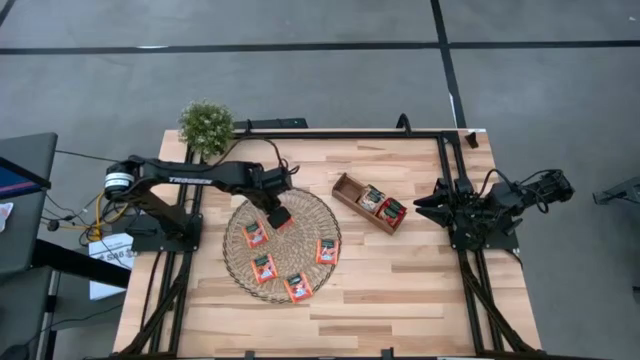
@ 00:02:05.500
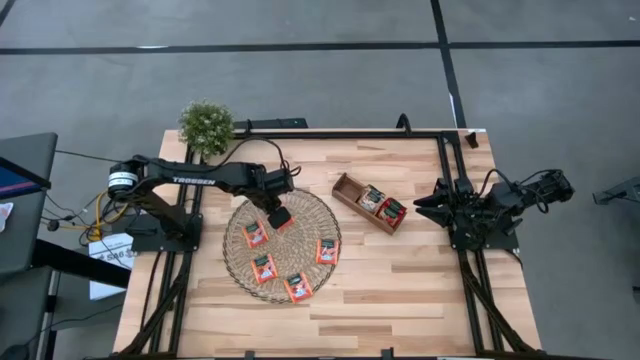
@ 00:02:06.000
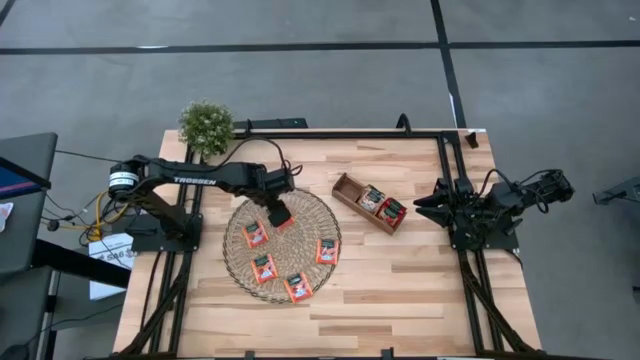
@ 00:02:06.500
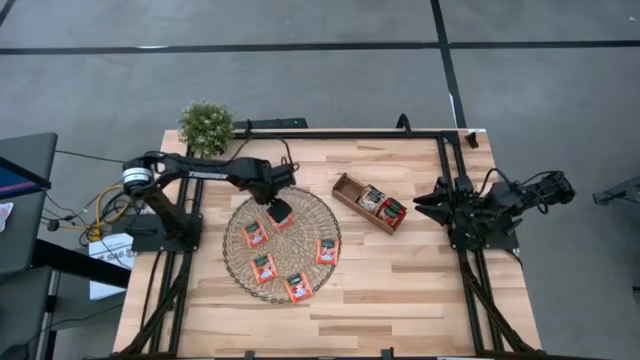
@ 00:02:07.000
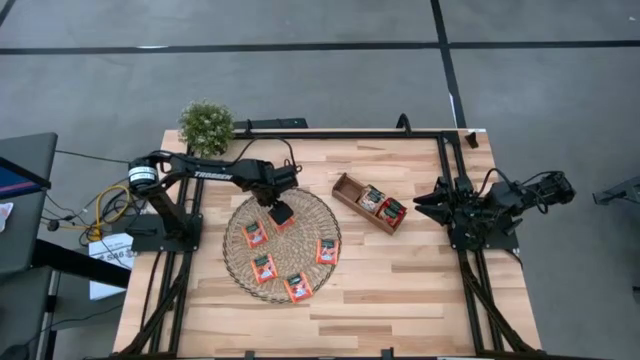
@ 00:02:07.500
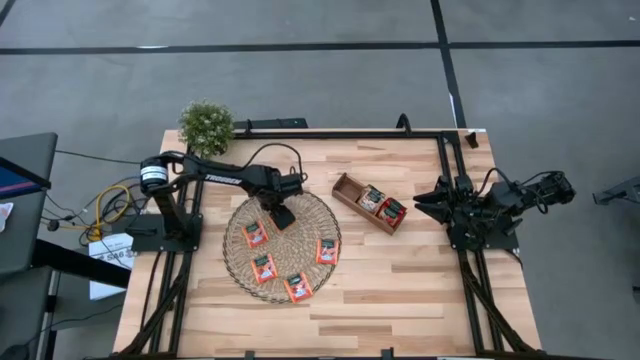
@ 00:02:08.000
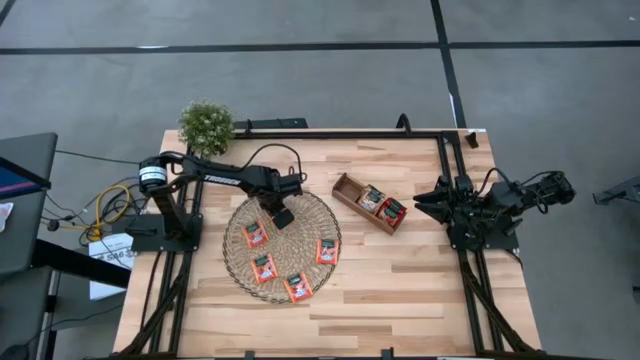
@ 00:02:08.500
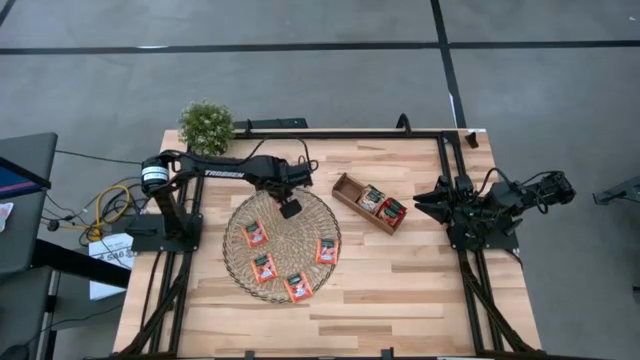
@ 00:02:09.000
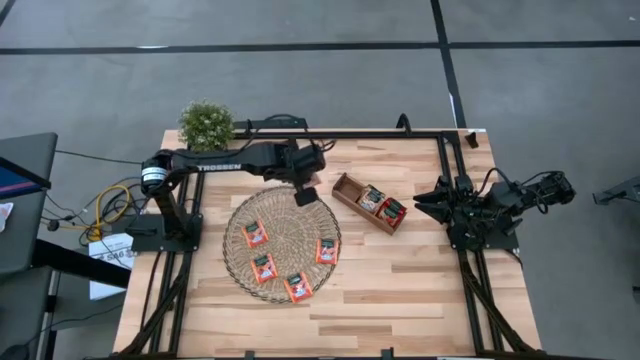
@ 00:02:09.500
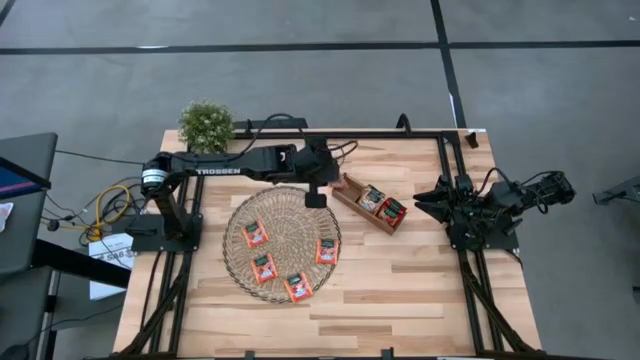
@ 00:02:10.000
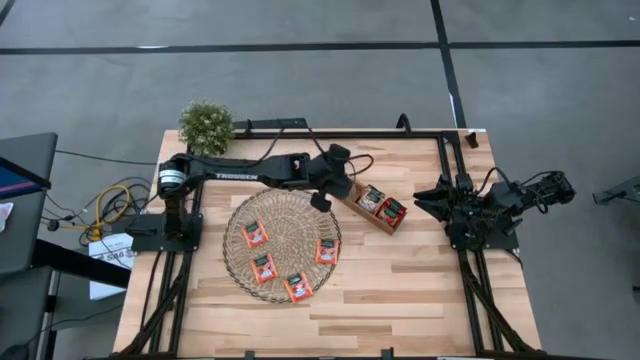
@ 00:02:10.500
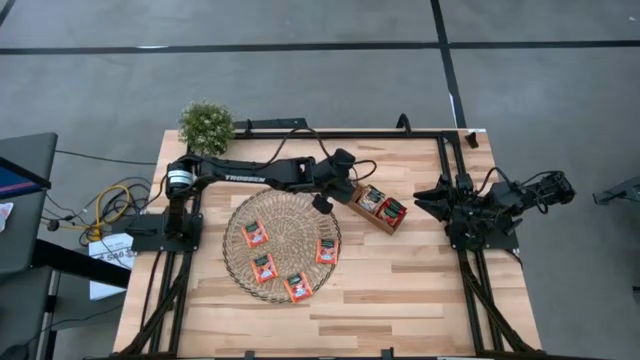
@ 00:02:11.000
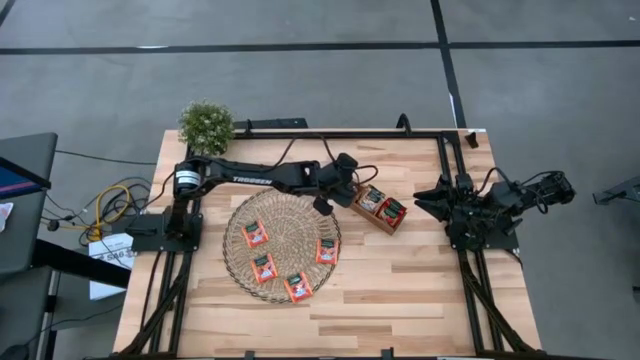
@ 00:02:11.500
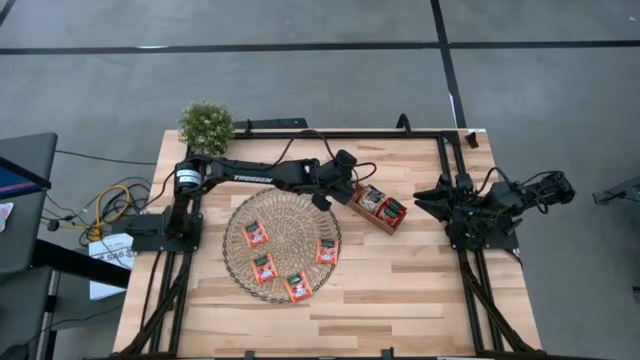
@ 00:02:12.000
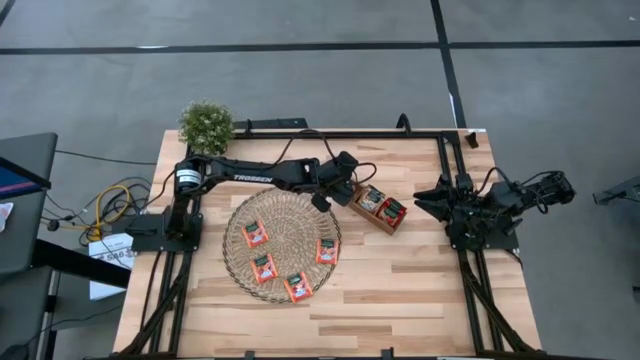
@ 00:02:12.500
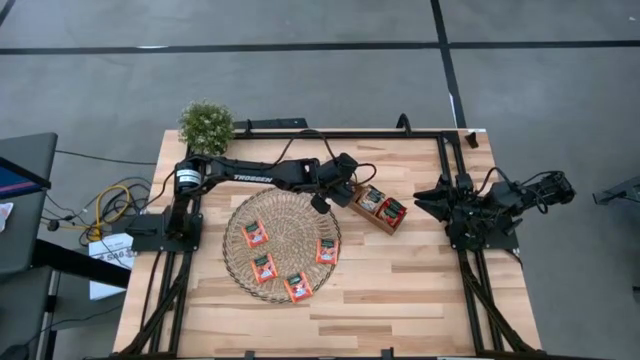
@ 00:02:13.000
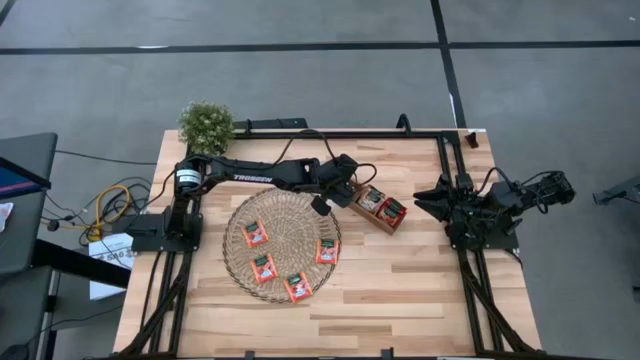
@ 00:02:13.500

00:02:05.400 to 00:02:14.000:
Task: Pick & Place Tea
Put the orange tea bag into the left section of the wooden organizer

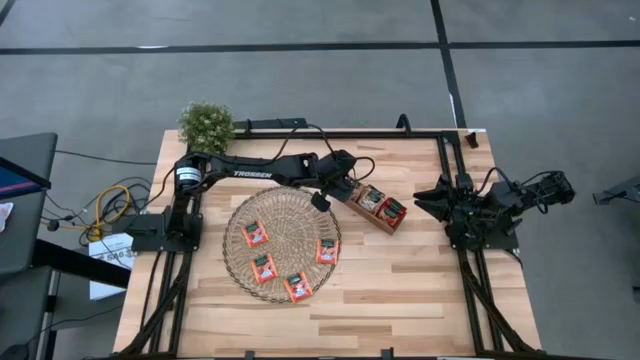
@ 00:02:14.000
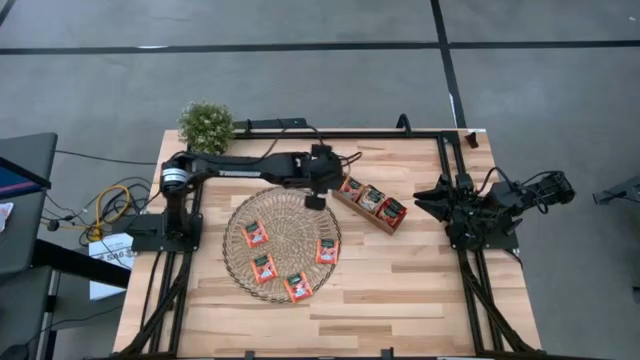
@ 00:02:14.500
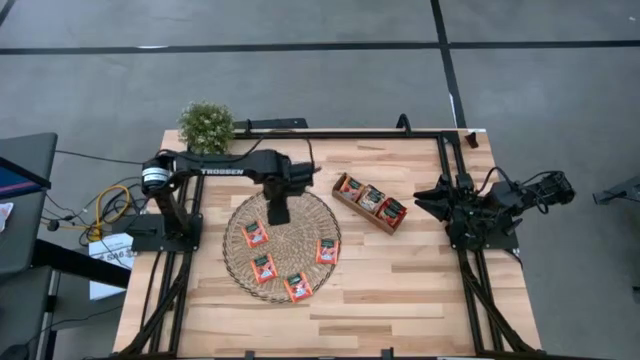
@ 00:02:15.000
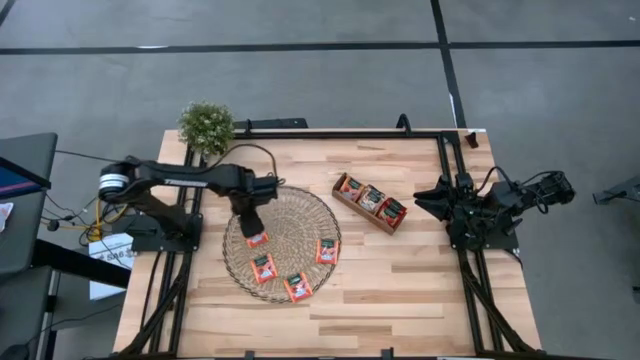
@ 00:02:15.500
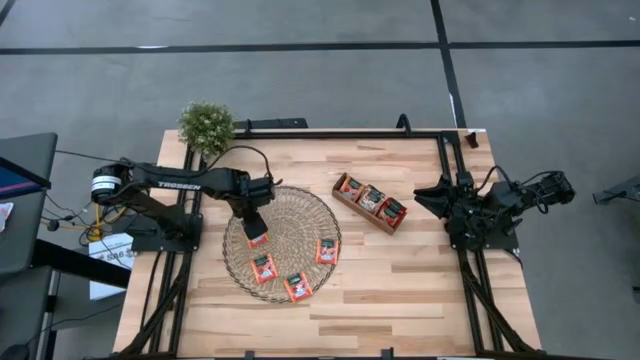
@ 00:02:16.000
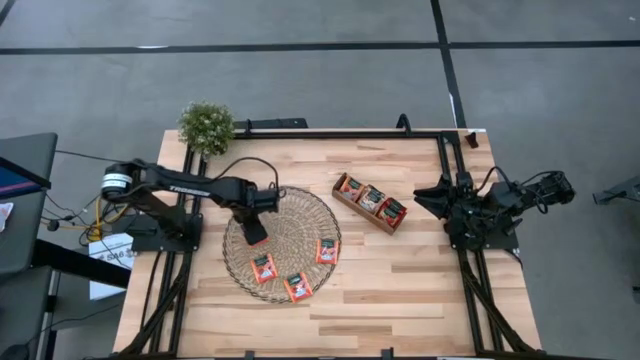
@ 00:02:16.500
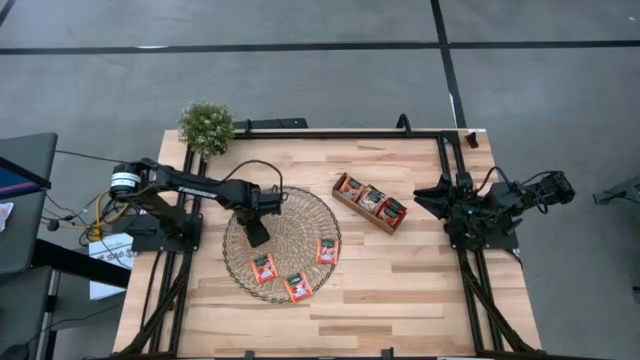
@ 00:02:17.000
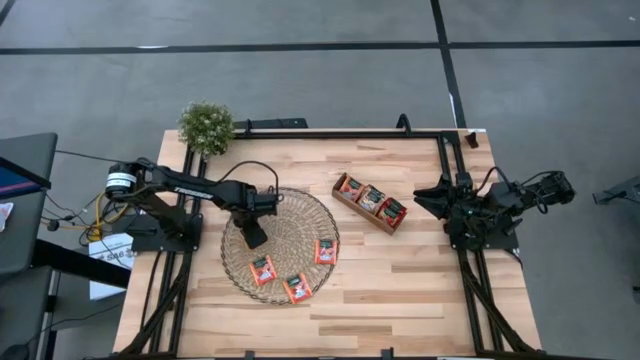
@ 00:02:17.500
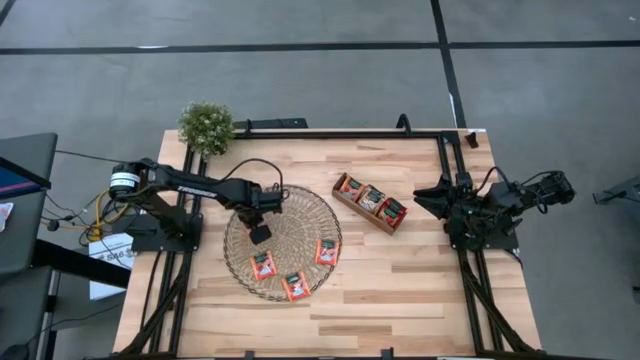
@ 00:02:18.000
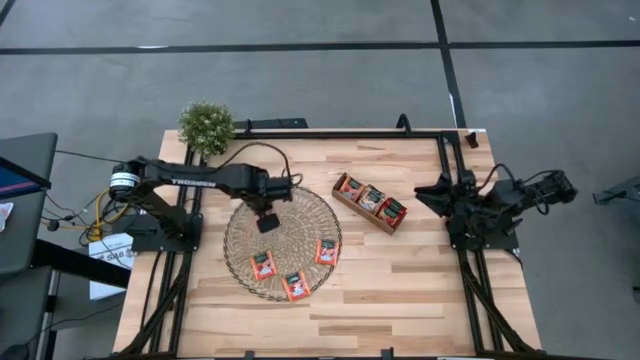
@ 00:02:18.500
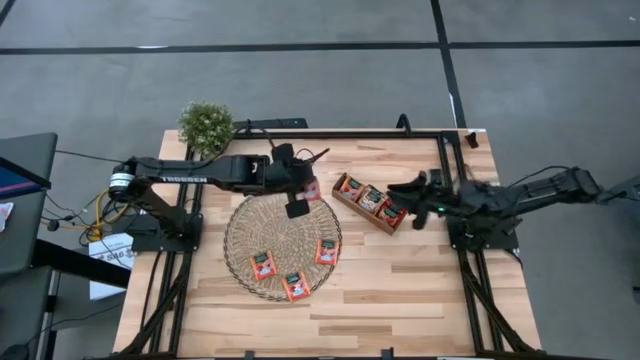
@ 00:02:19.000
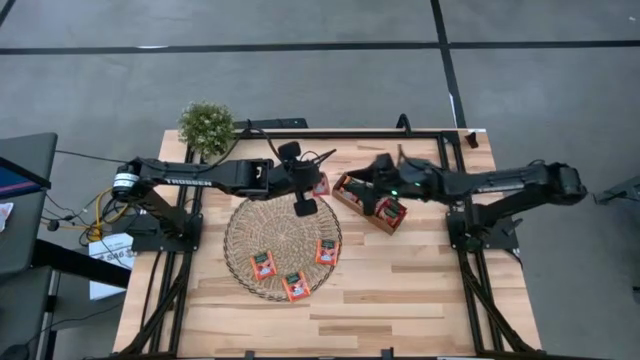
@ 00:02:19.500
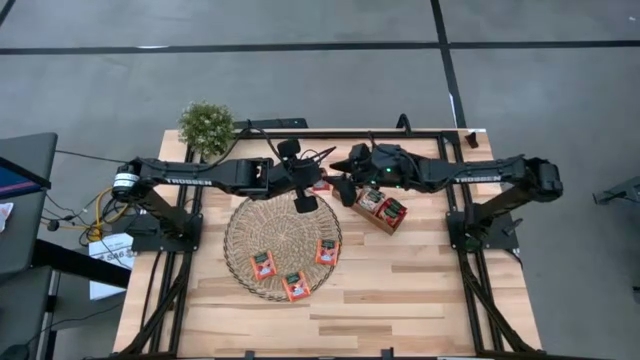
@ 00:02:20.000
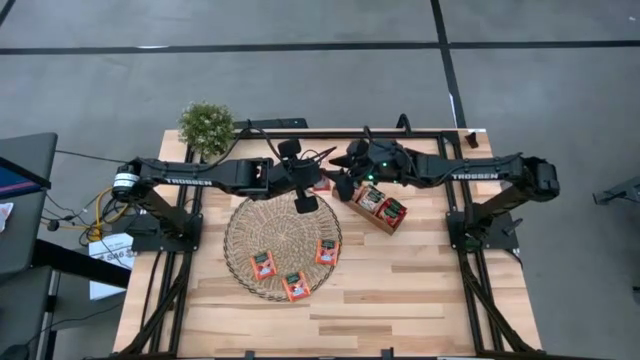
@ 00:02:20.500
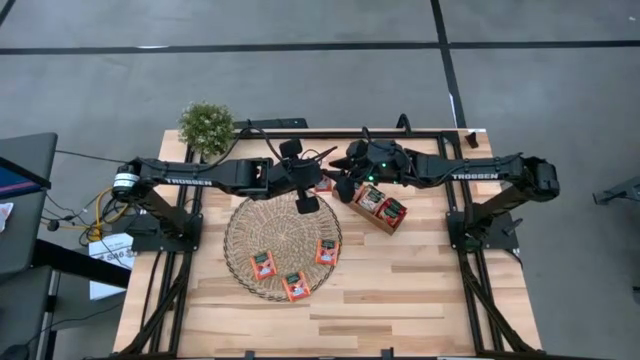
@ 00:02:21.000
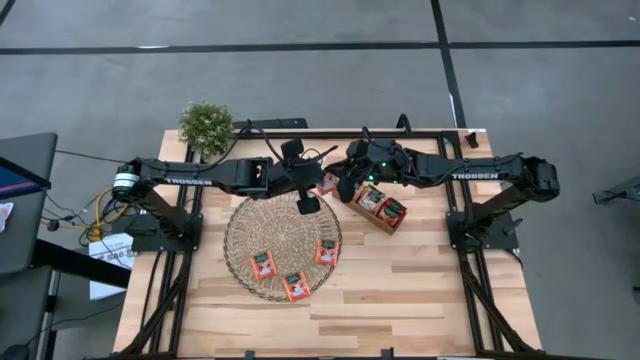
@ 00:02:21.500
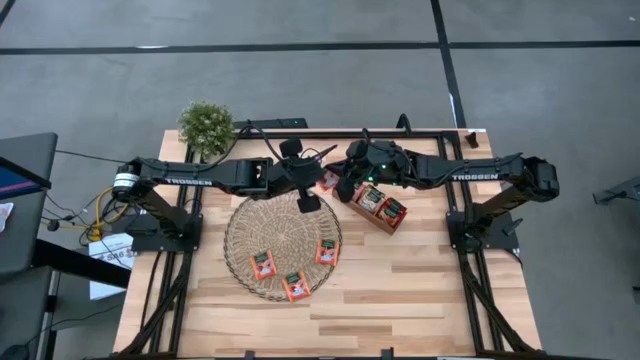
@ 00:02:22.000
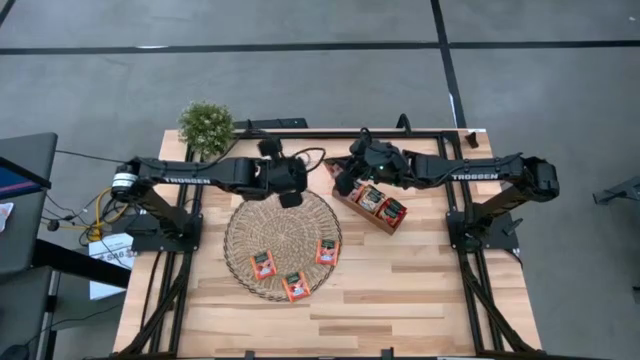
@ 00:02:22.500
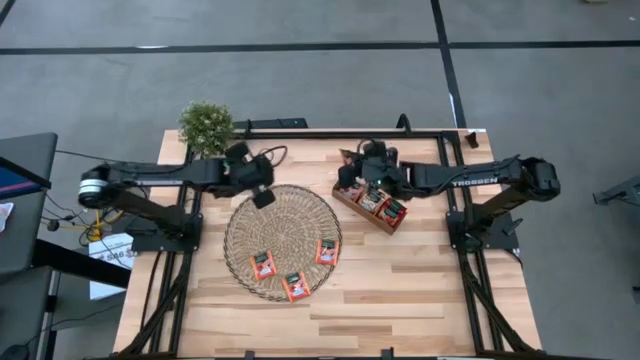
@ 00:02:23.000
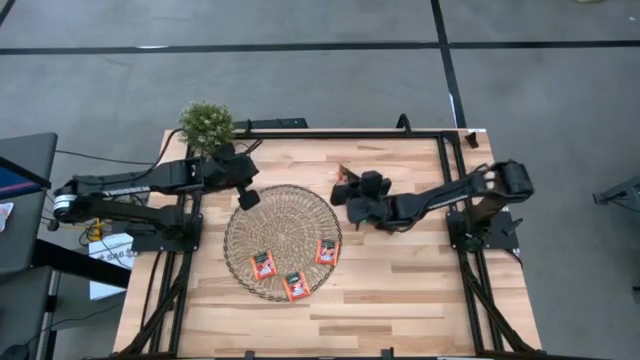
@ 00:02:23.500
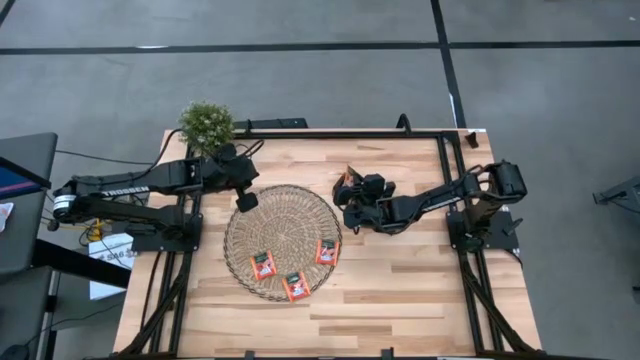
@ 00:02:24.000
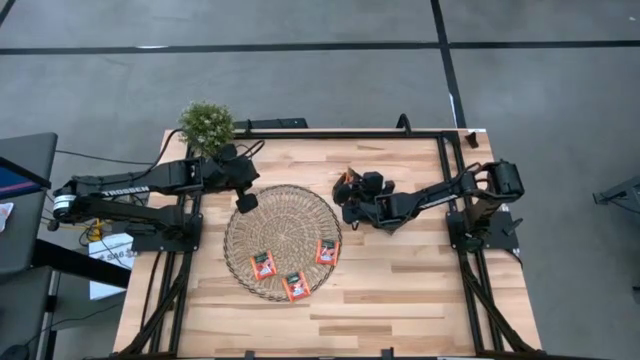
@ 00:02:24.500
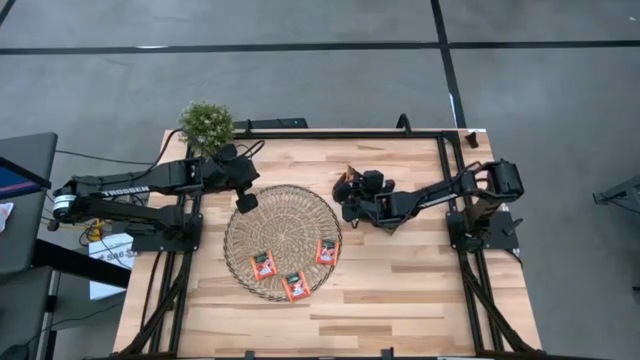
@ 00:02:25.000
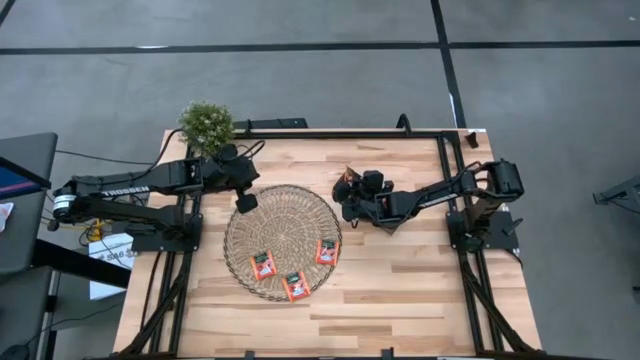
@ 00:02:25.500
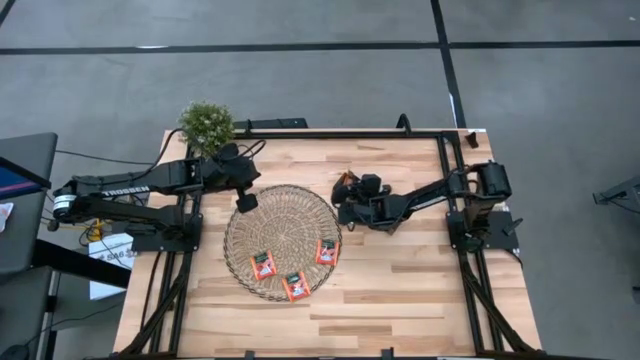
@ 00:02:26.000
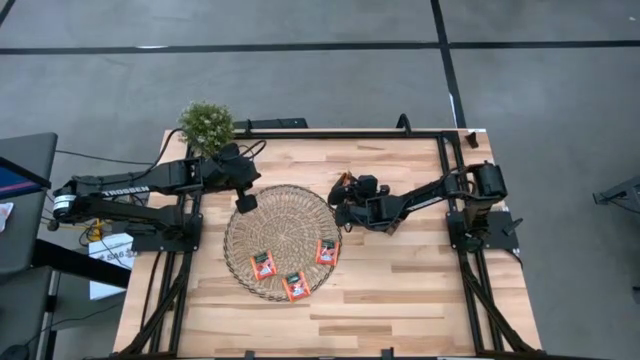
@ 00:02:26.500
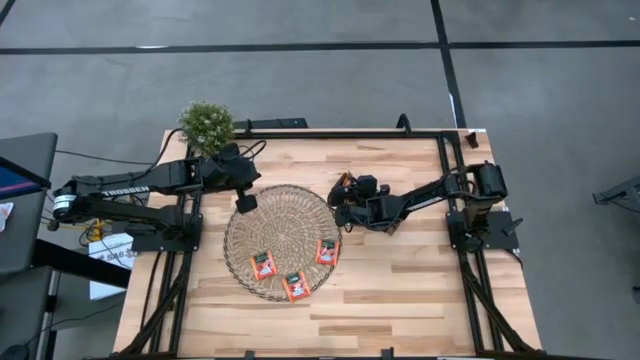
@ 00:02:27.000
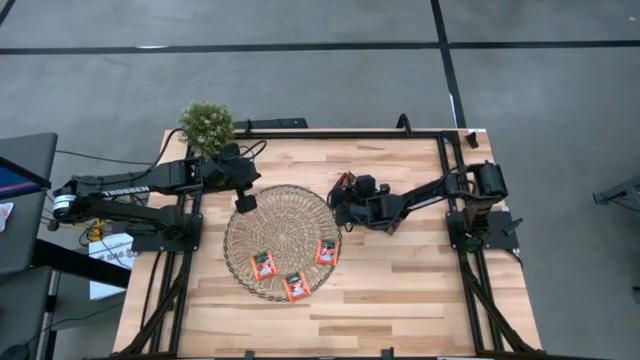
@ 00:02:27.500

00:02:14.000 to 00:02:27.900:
Put the orange tea bag into the left section of the wooden organizer
